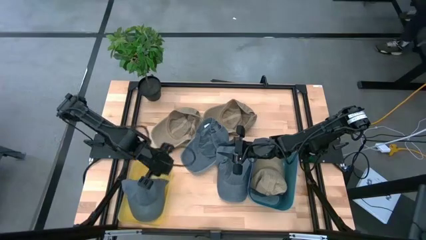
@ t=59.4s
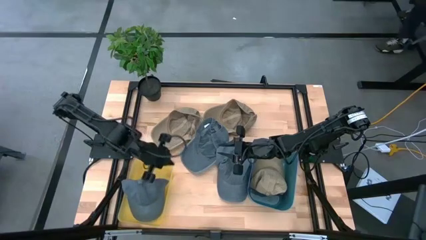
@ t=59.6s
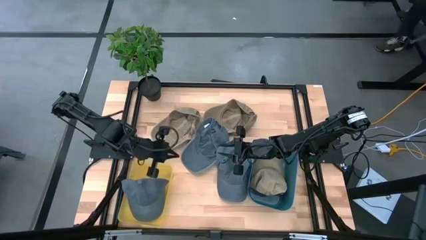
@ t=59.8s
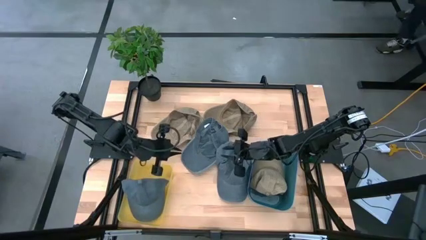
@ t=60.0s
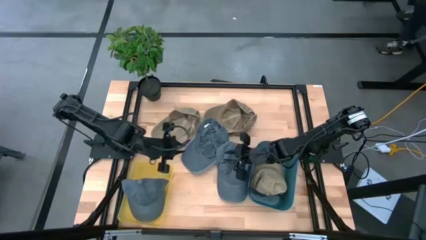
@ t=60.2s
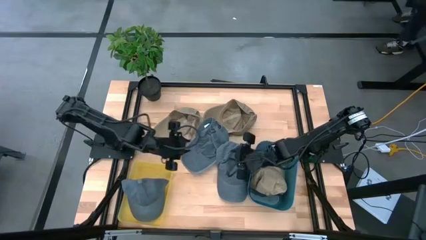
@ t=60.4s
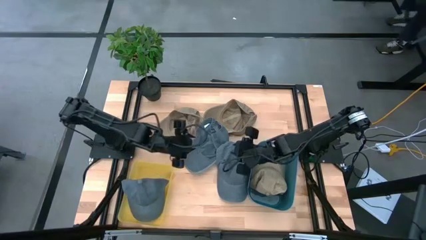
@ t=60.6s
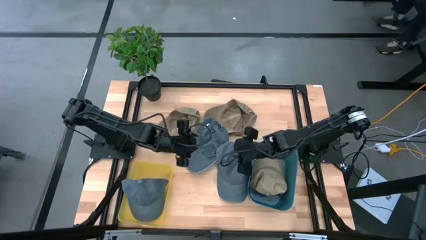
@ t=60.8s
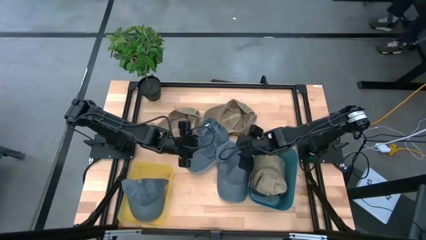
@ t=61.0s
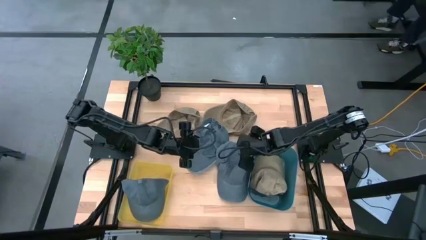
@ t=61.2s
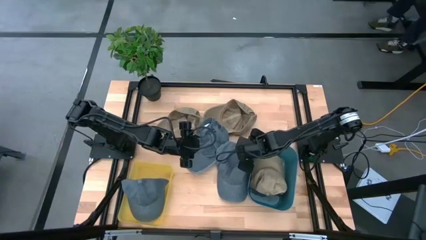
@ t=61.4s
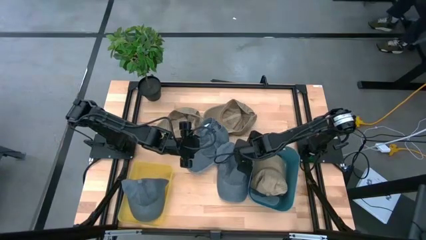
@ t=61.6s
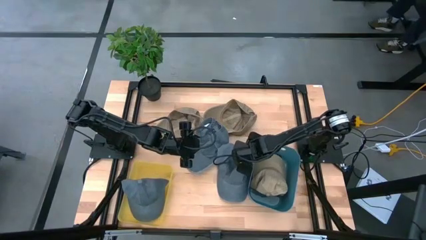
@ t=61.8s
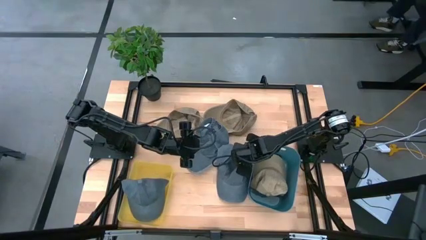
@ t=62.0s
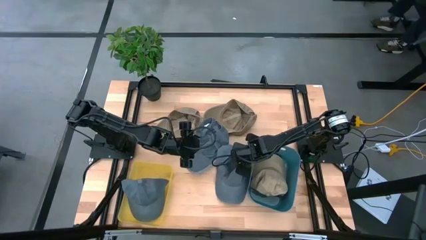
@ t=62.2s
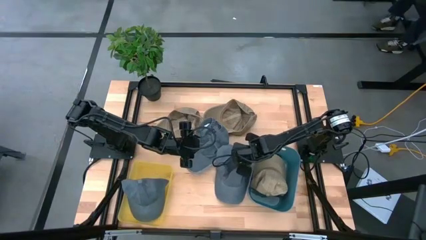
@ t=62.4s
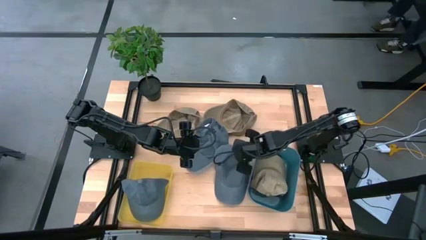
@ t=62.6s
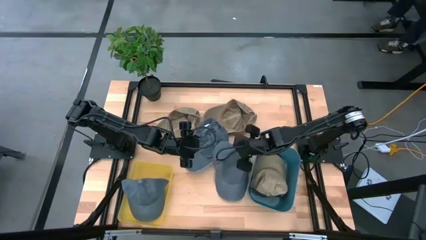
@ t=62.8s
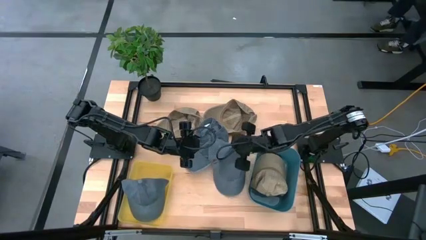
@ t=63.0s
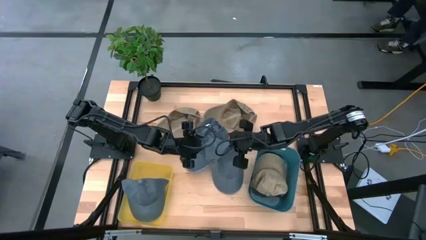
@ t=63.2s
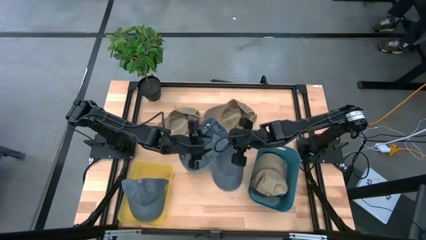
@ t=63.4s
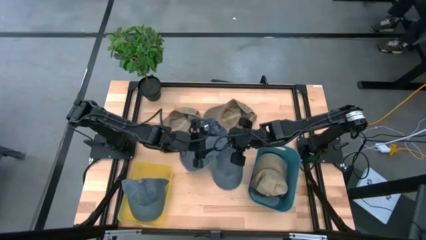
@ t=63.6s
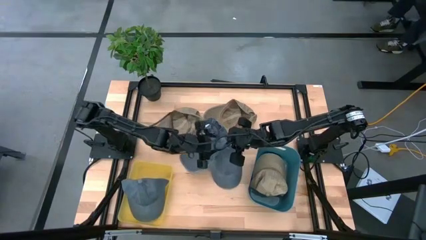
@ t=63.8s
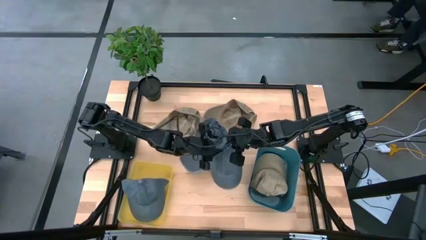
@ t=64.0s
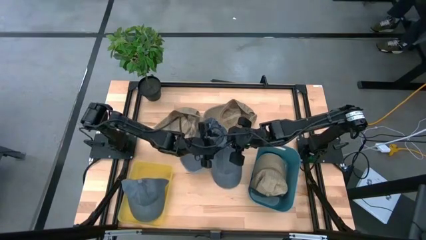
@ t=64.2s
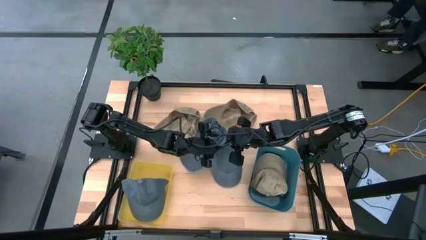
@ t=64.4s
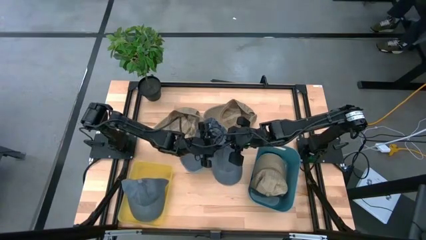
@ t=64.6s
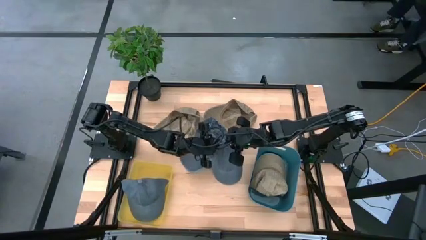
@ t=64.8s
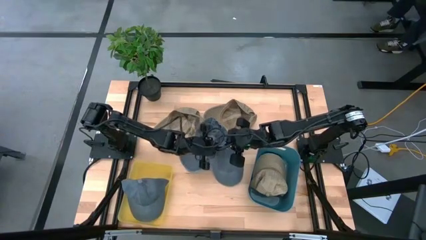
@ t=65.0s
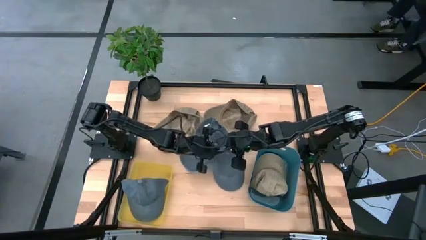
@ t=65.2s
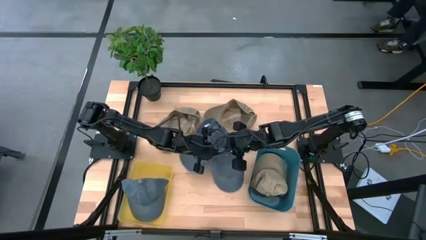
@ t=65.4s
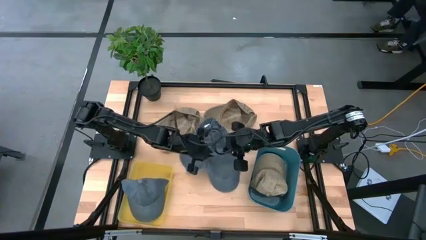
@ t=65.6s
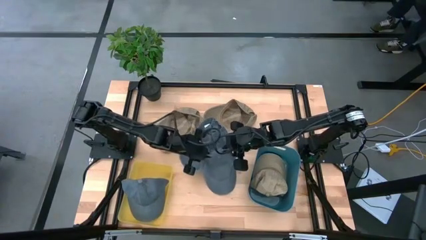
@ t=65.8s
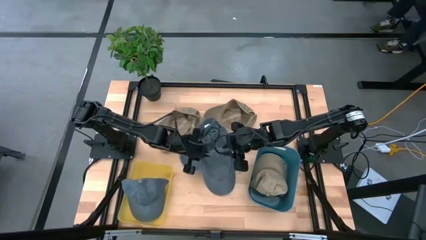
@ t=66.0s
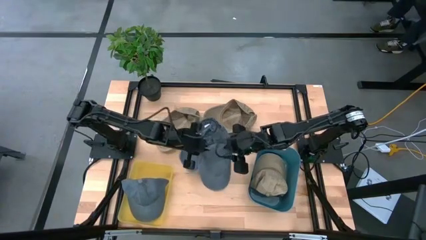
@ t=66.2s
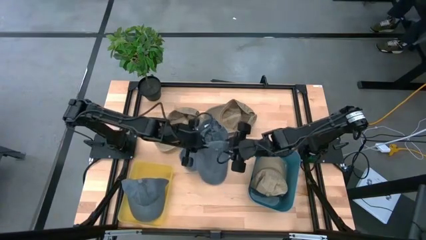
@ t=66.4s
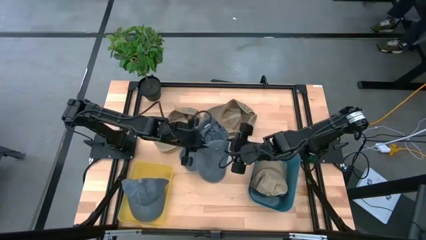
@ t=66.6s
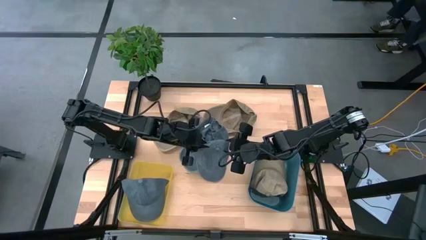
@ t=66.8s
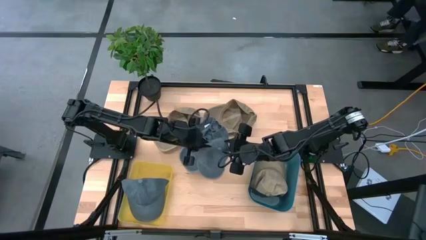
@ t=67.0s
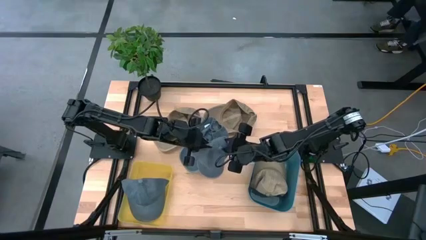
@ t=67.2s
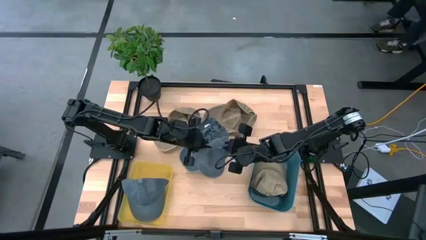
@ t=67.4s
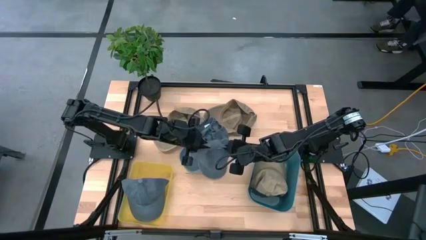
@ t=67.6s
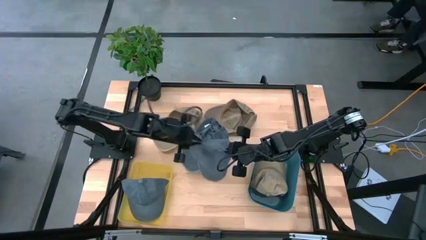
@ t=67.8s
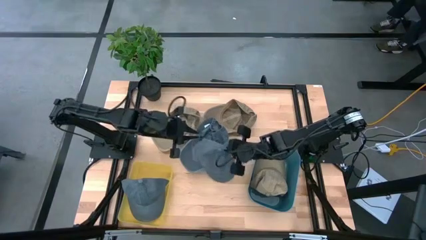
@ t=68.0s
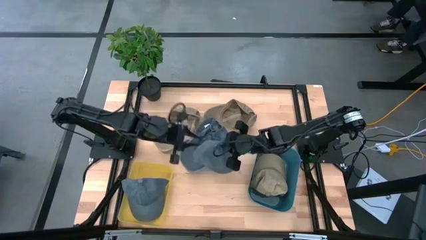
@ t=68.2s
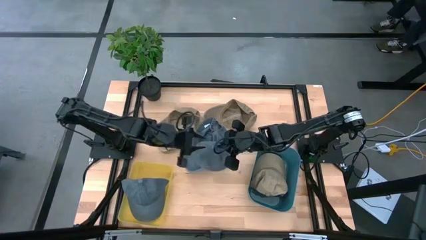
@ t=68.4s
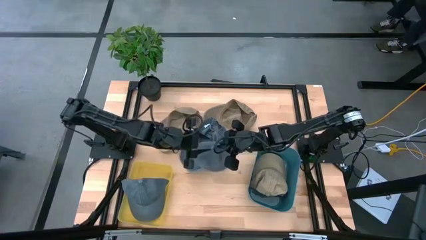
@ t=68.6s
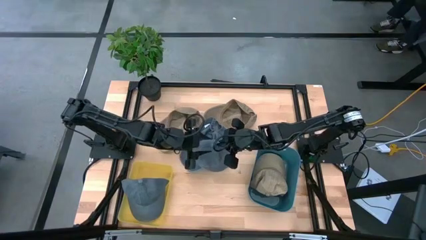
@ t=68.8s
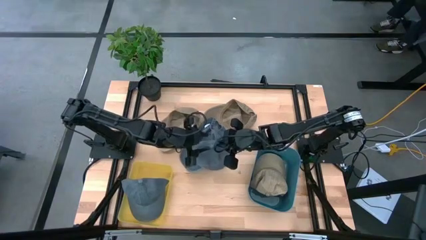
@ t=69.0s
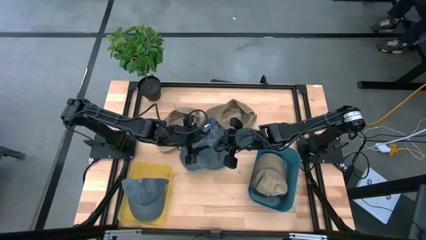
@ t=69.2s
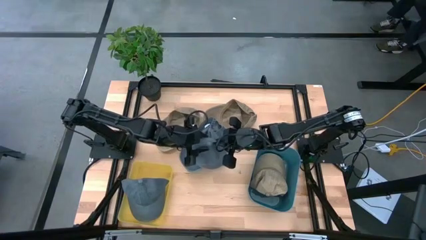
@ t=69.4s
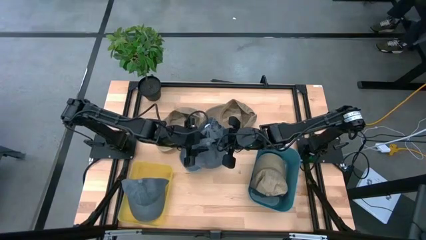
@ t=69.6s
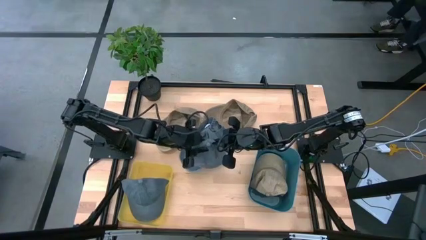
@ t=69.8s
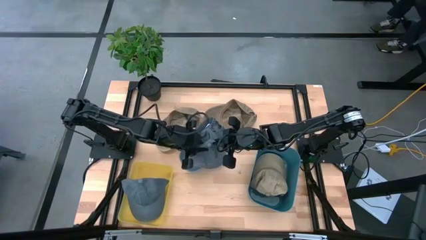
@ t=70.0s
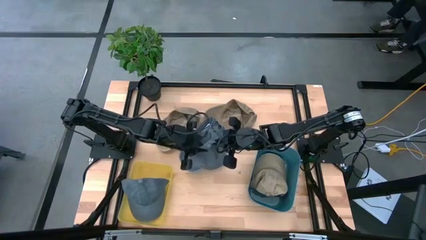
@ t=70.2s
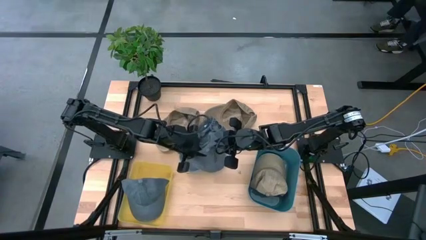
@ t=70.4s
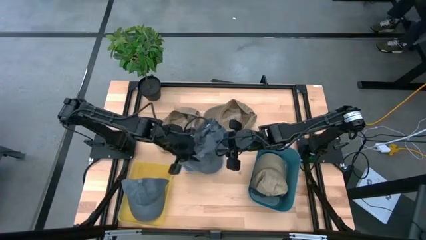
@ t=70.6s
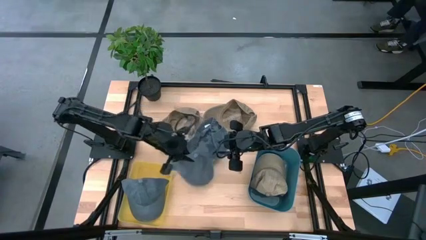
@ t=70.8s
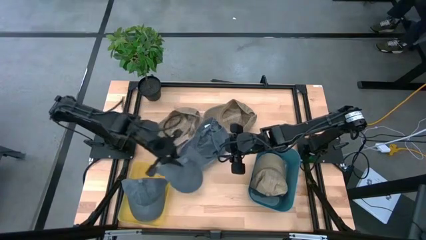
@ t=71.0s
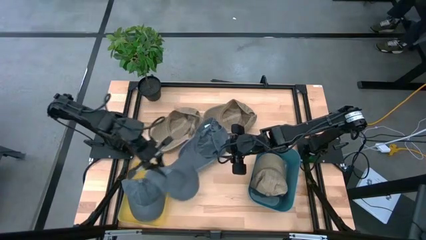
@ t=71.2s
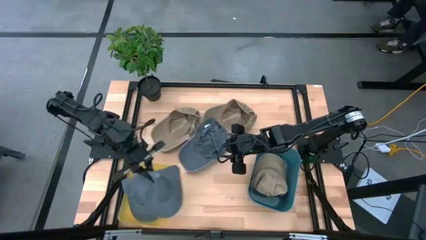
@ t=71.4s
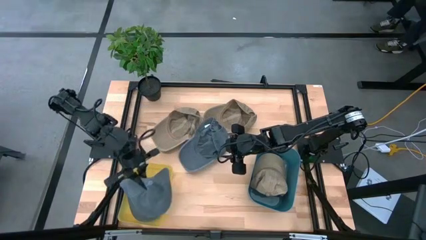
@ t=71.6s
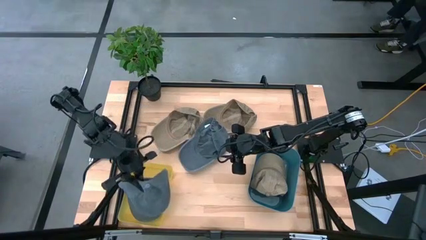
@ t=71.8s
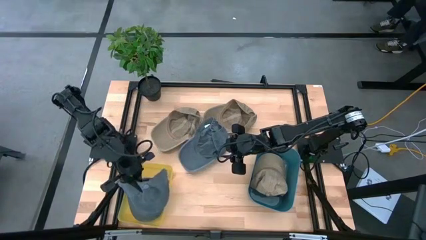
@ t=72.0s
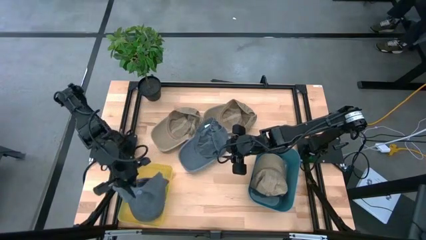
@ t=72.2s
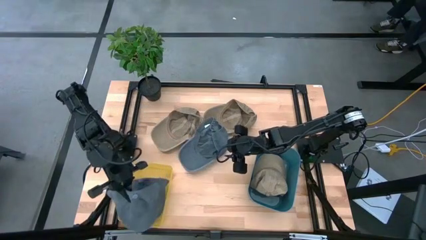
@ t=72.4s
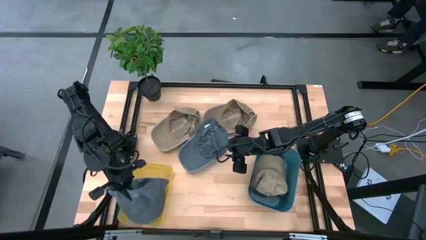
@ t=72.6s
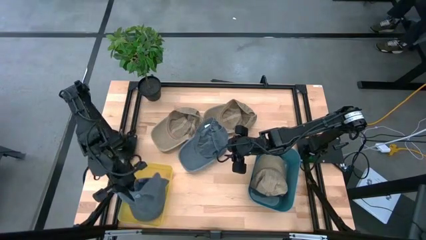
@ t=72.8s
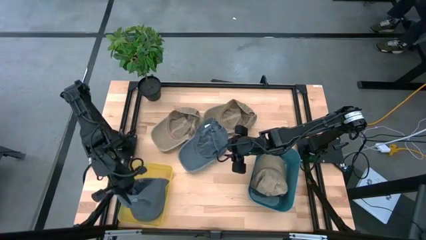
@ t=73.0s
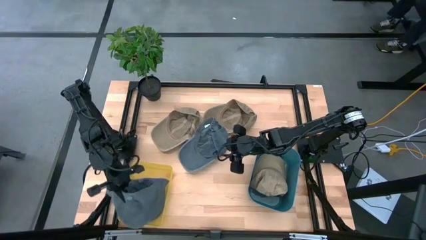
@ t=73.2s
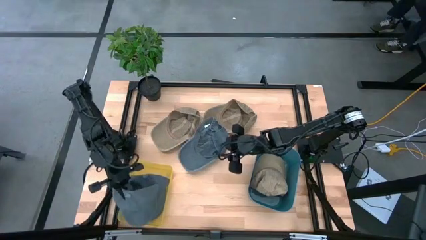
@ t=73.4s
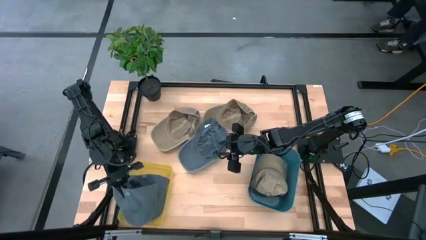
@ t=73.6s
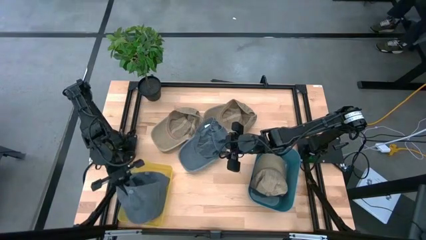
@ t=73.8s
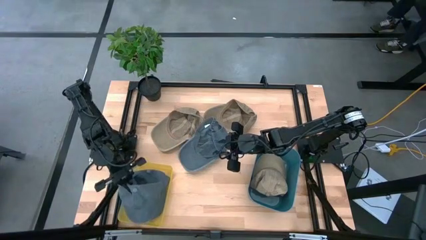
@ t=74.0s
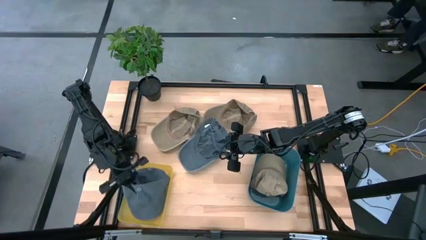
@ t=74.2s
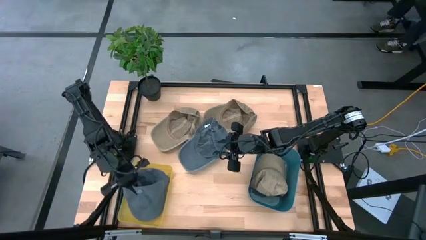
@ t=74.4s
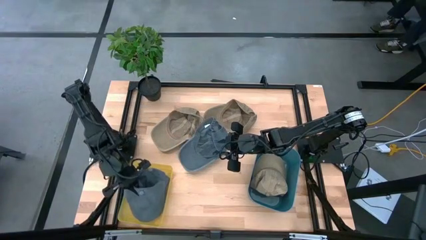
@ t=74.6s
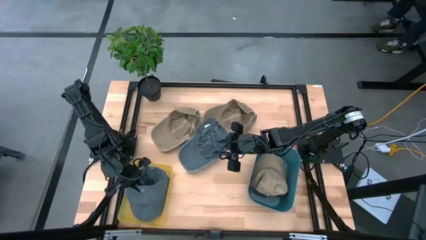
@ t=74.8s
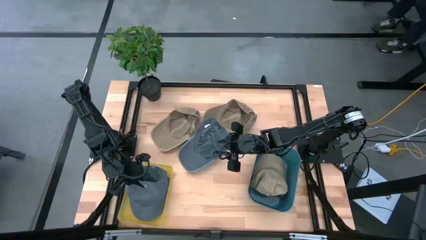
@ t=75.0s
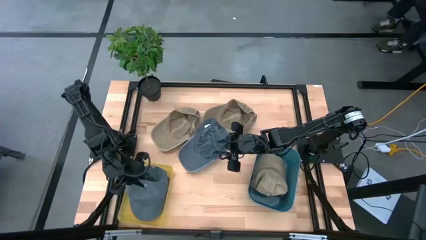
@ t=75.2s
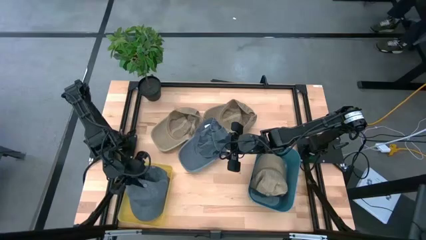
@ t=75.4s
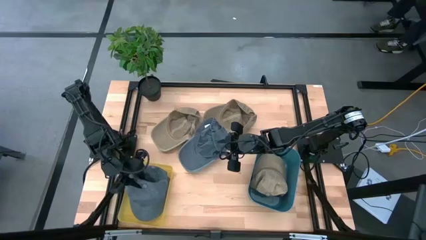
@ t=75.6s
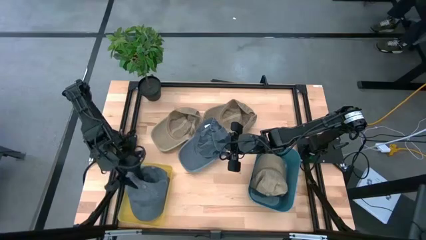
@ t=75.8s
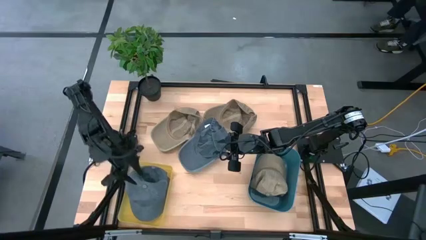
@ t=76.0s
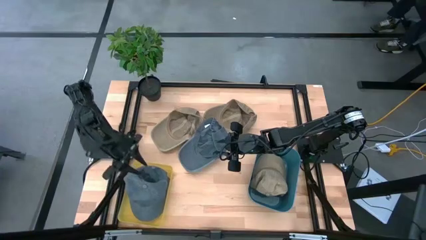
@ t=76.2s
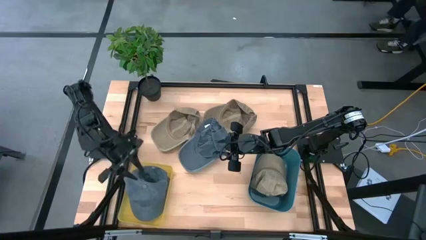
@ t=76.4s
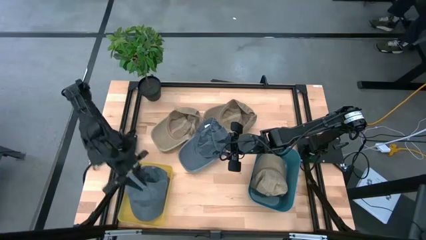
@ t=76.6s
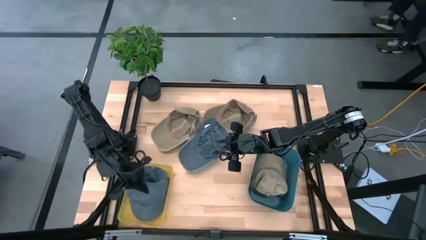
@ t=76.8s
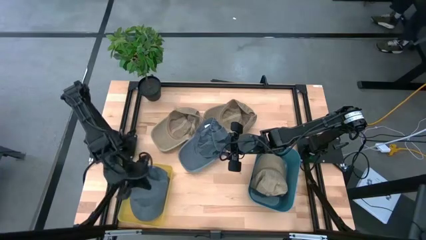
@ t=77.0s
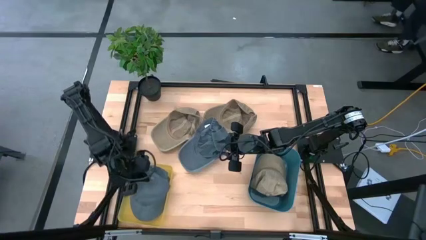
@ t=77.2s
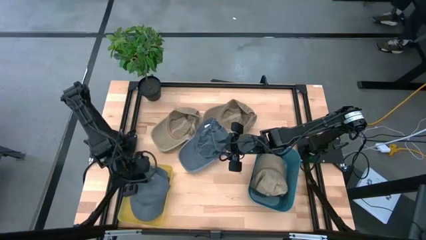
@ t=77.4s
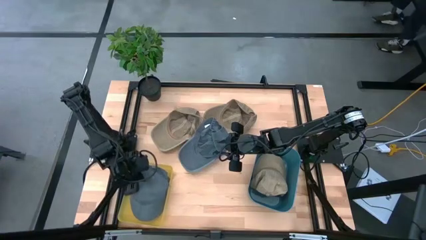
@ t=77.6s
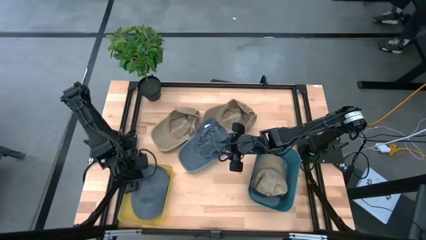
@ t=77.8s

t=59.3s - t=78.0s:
Task: Pick & Place hat
Put the right blue cap into the yellow bin
